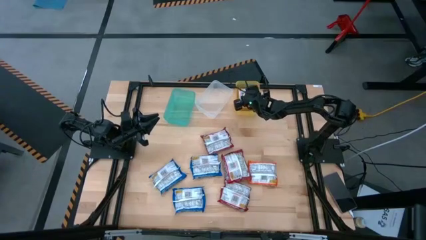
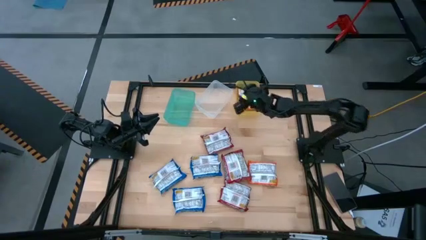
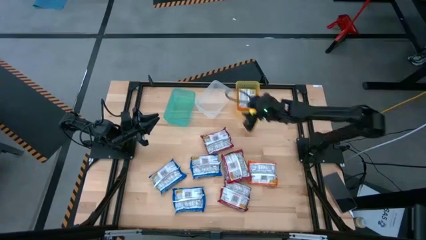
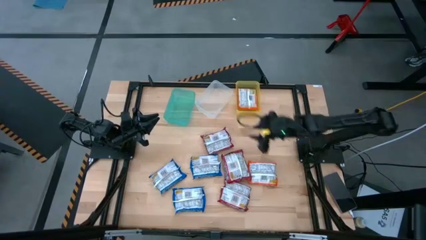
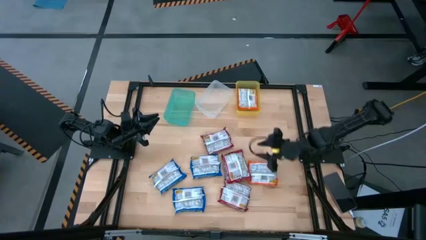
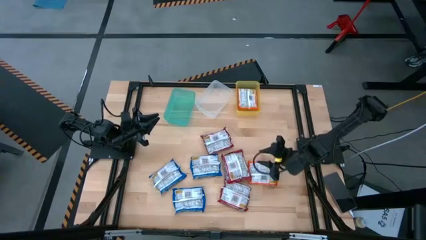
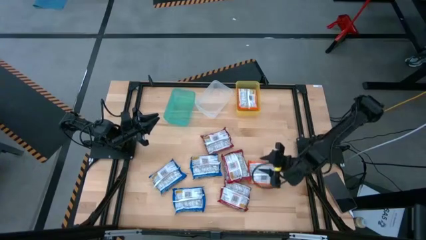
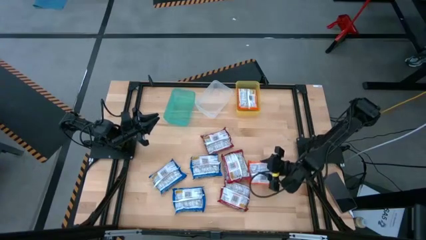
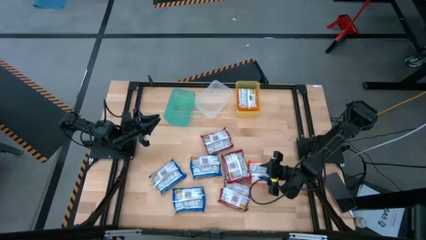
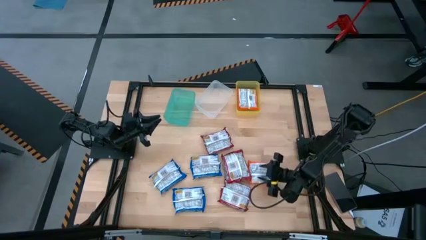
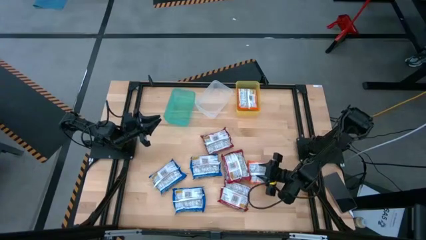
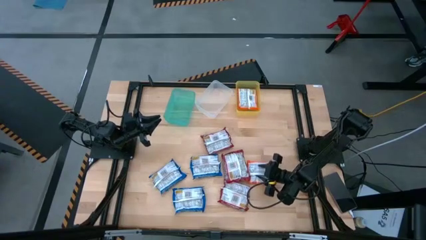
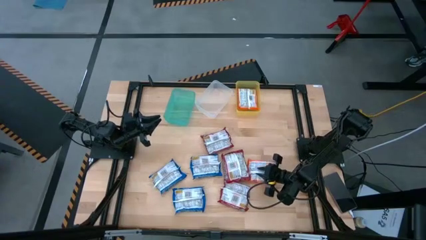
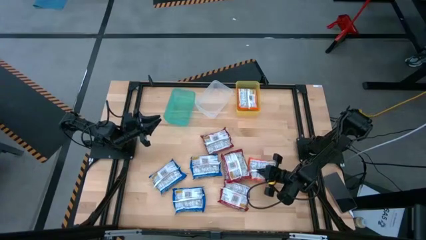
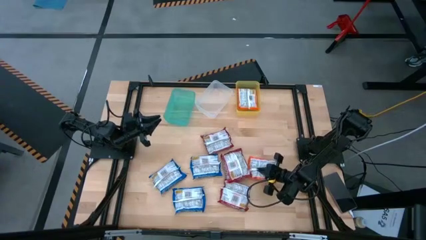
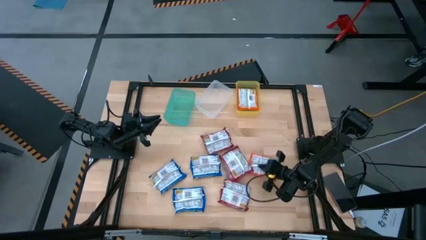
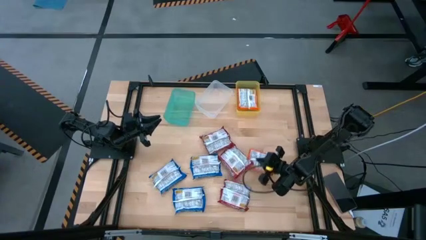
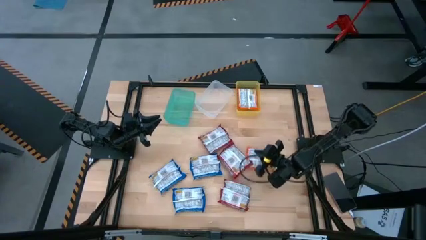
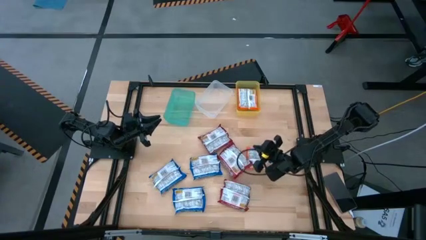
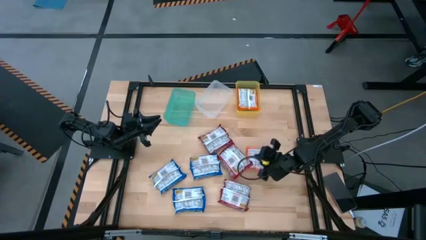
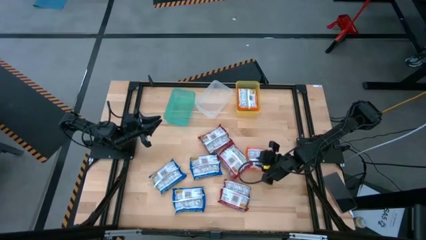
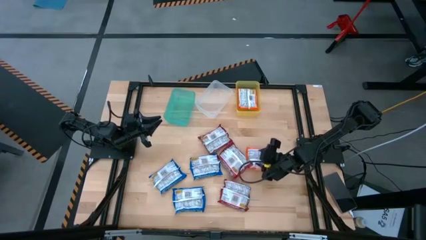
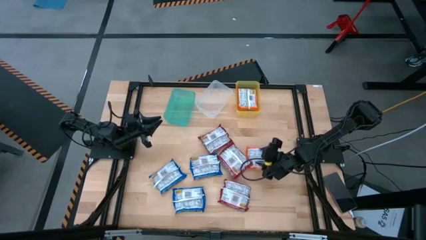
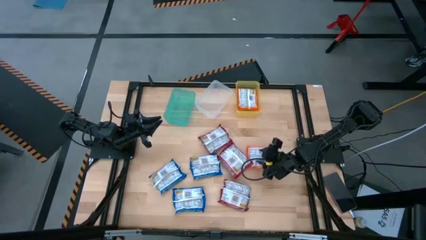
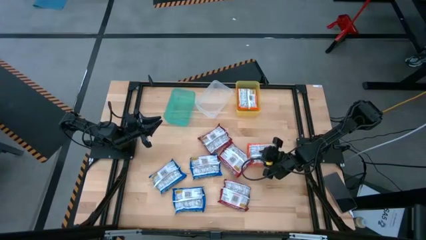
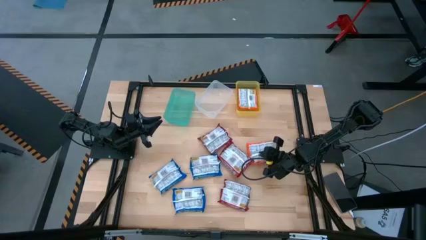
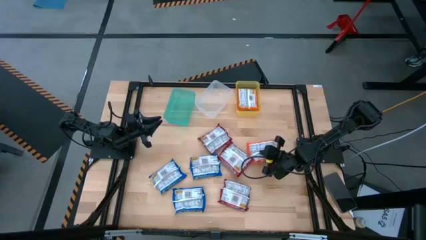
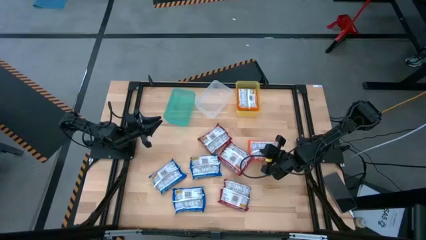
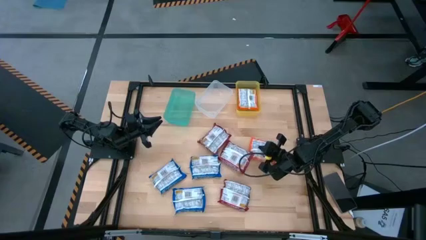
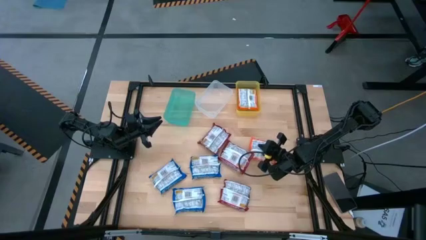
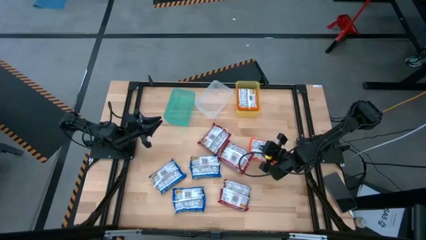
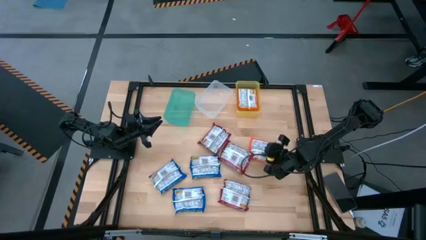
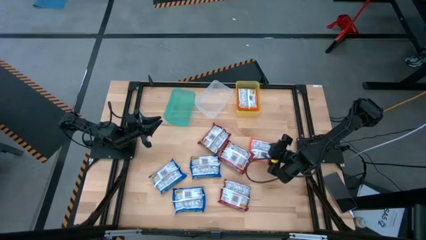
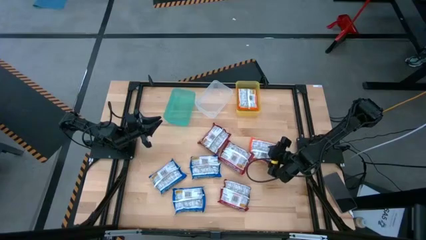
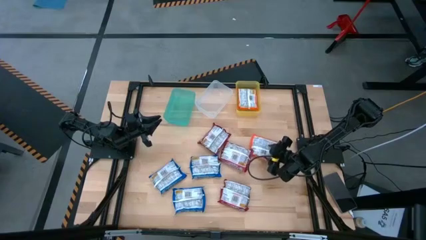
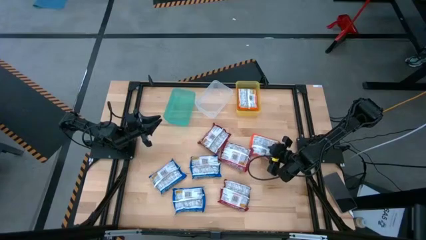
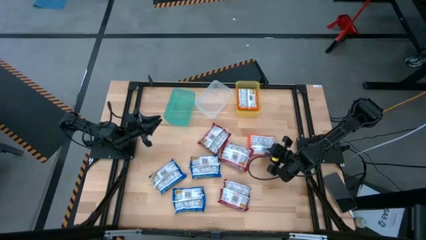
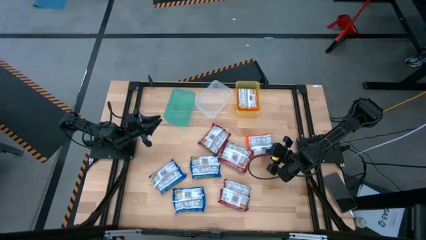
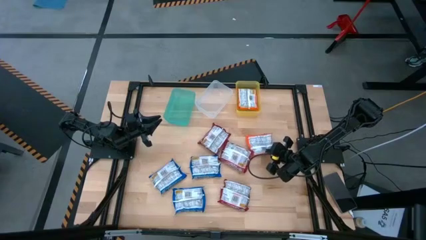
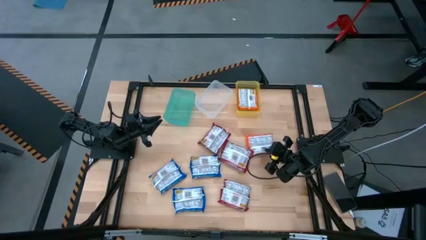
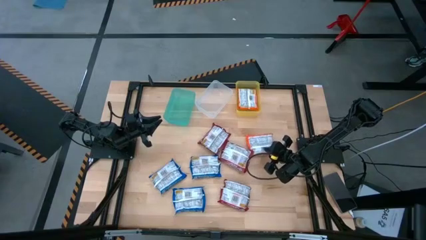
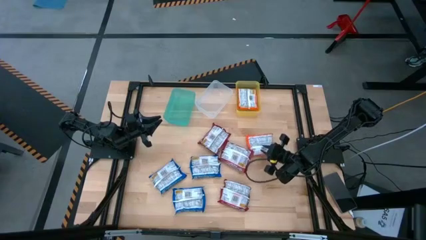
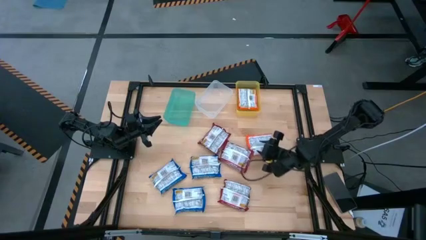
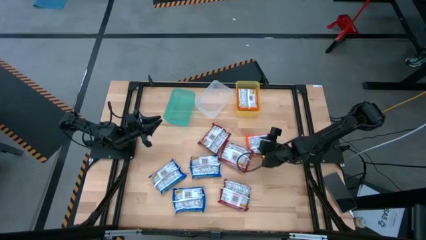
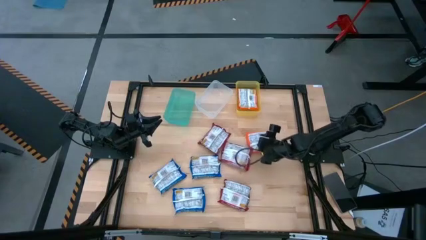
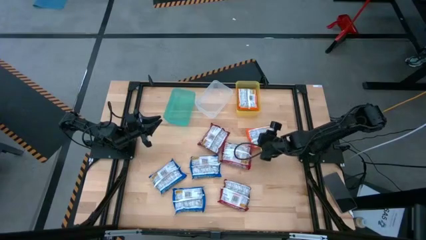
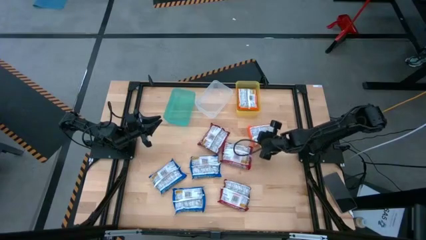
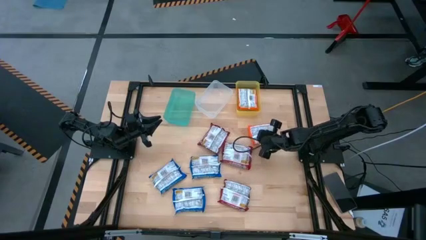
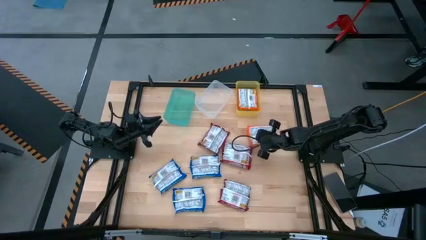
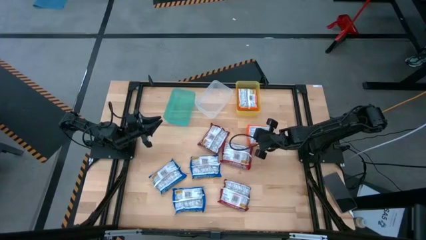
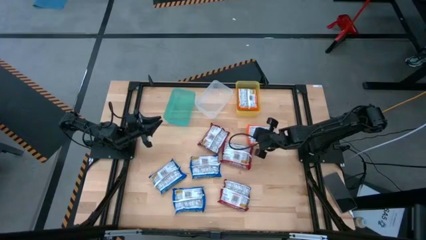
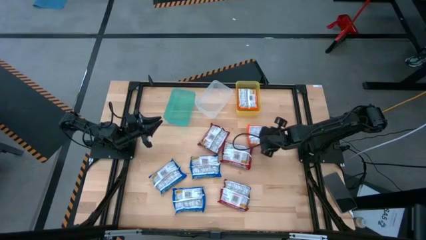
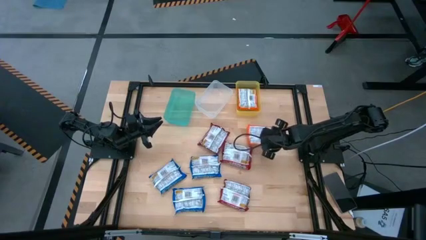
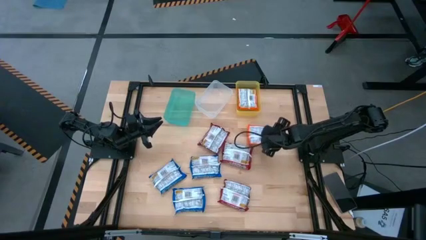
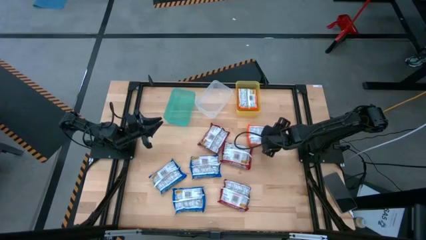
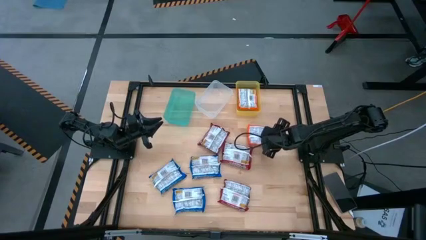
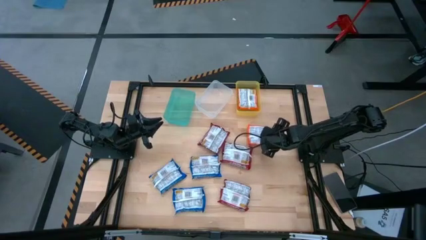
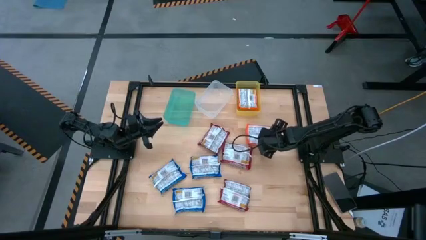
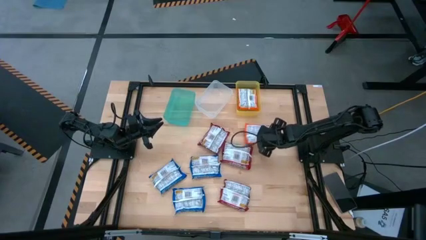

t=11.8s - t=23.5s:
Task: Sort Maruchan noodles
Put the orange noodle pack into the yellow bin

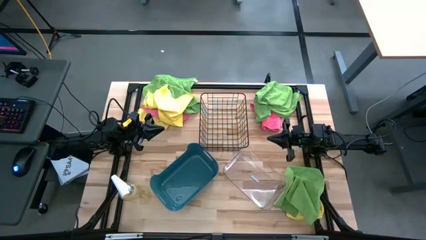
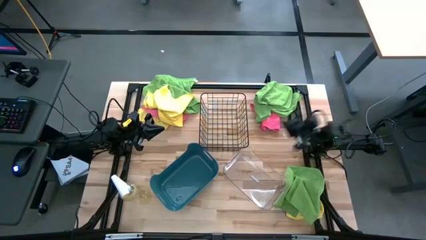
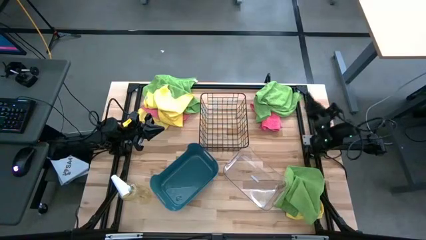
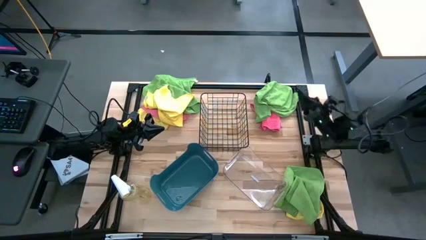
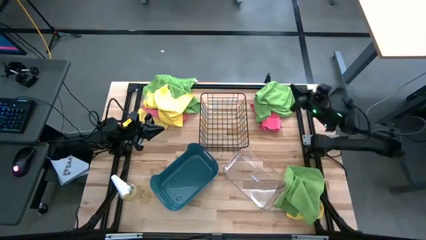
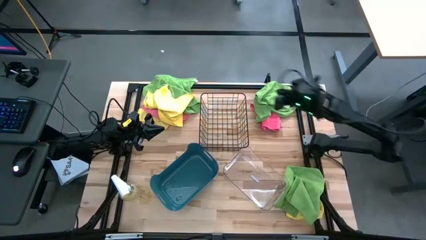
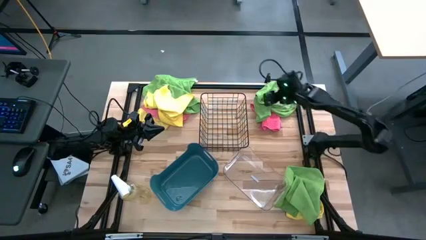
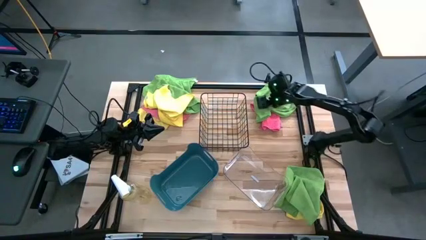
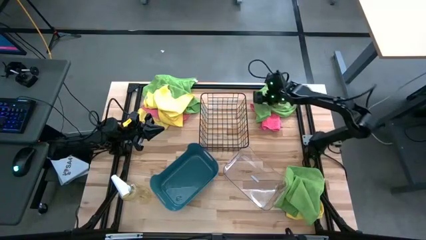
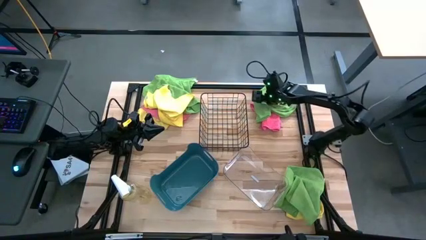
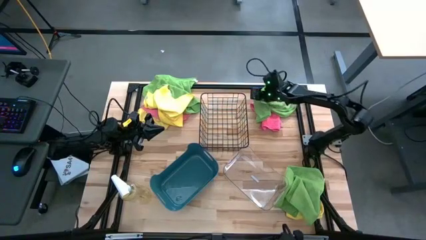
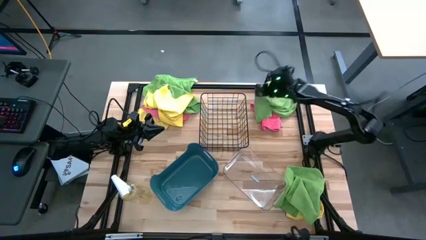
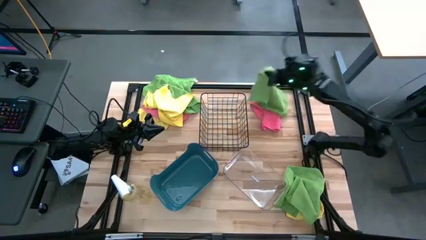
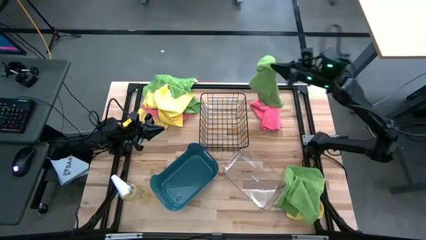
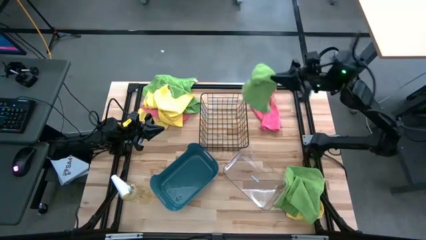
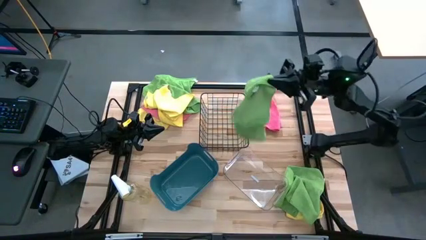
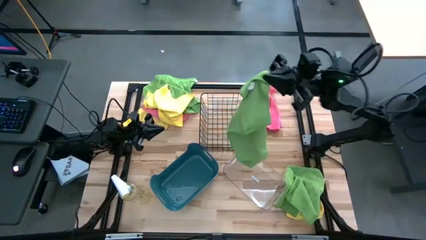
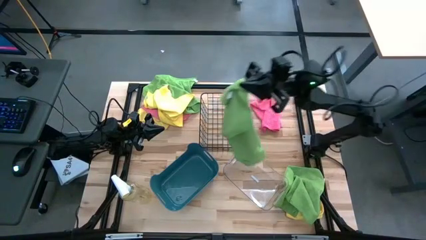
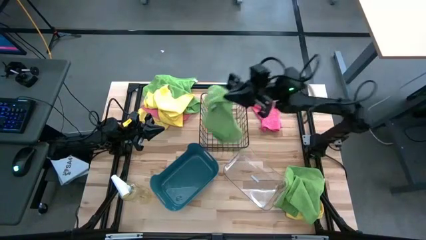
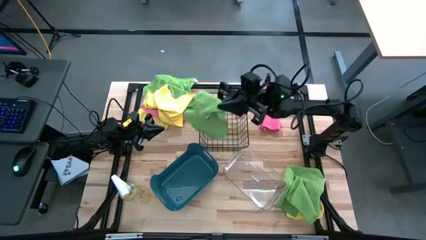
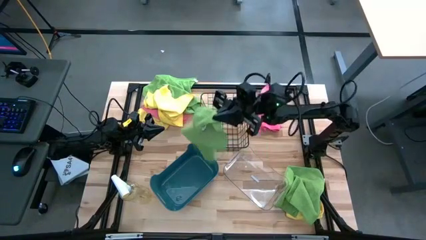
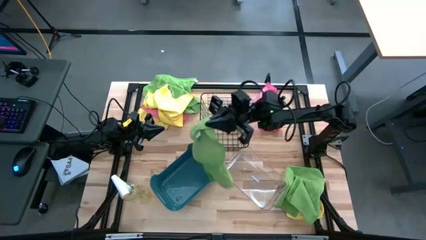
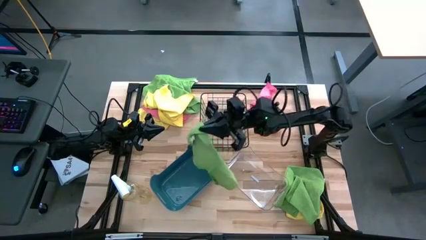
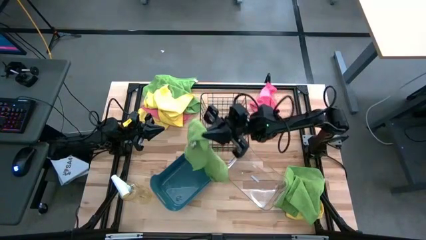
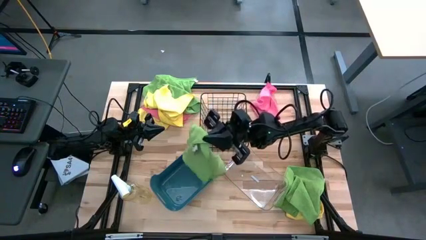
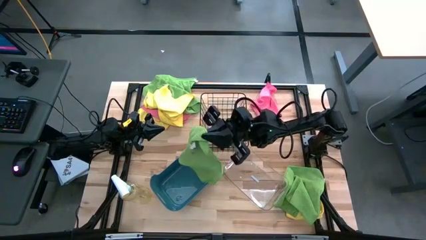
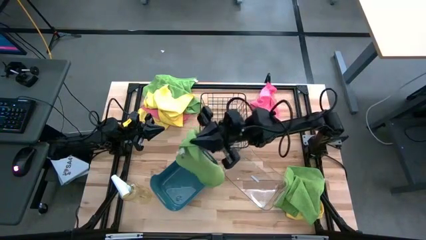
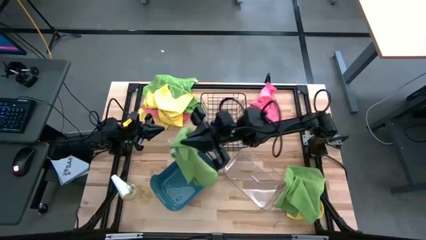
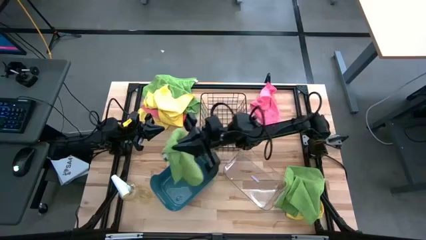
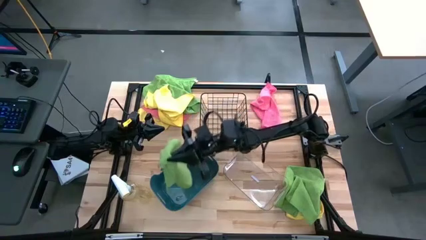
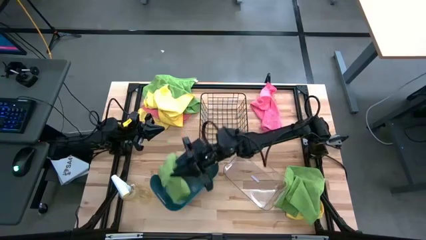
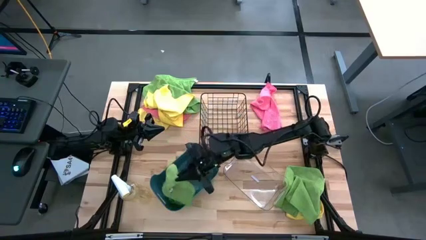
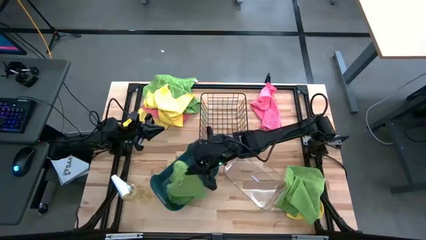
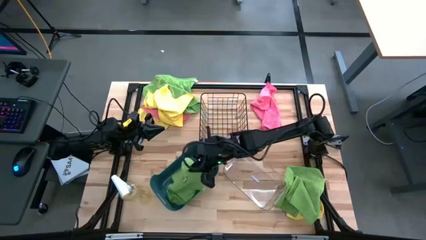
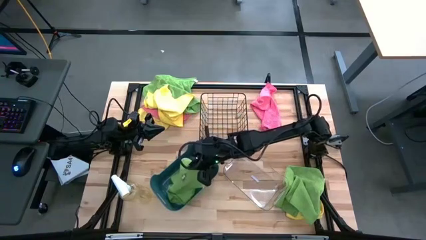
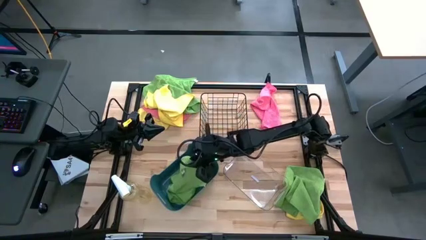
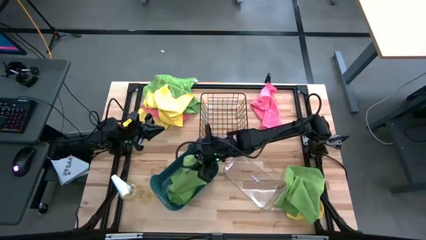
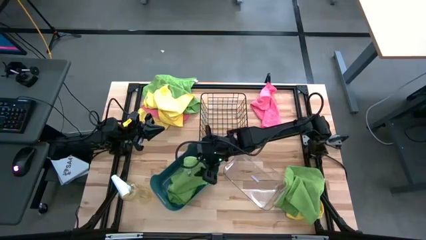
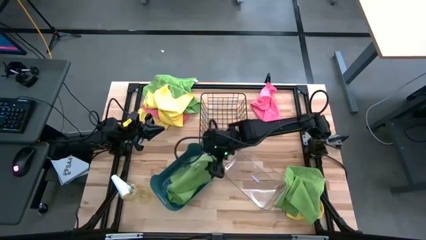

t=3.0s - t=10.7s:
Task: Sort microfiber towel by color & place in baskets
Put the top right green towel into the blue bin
